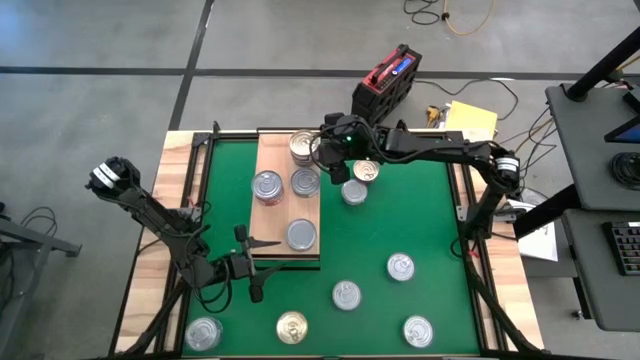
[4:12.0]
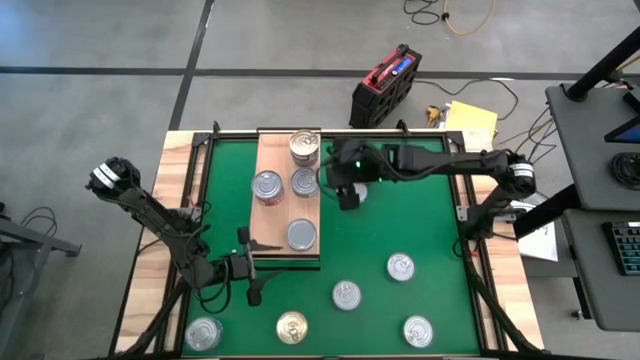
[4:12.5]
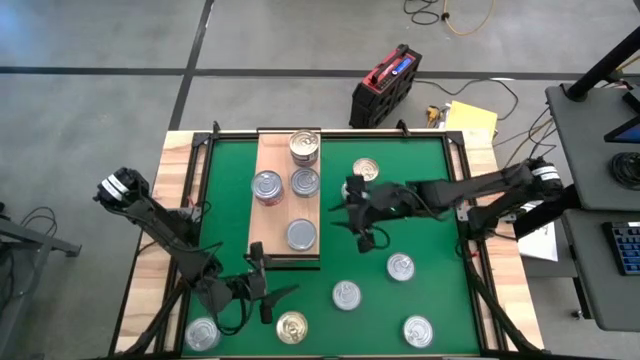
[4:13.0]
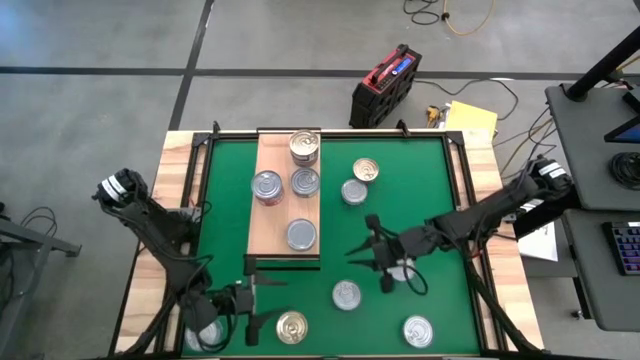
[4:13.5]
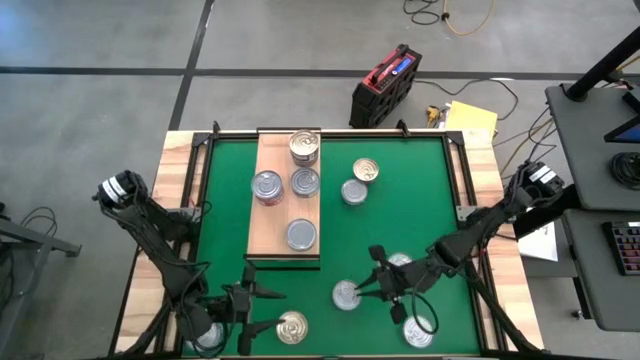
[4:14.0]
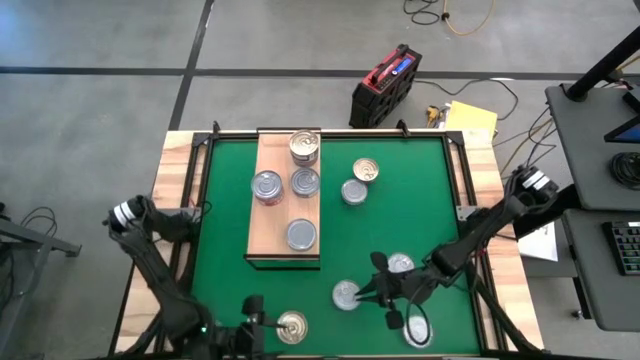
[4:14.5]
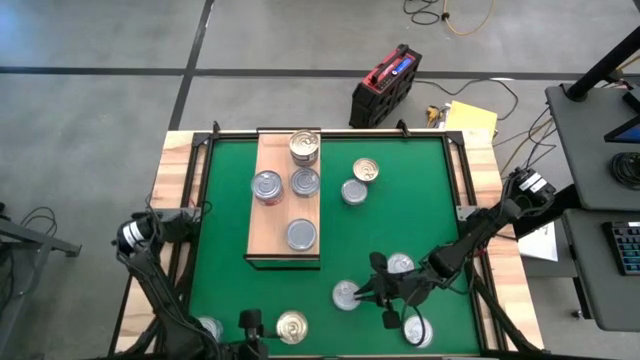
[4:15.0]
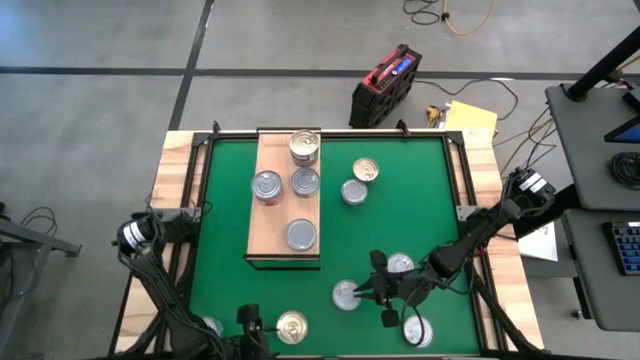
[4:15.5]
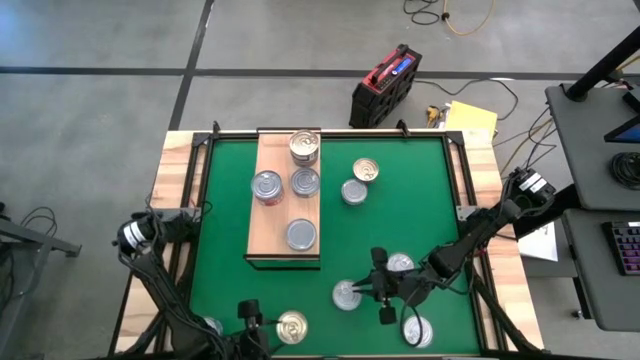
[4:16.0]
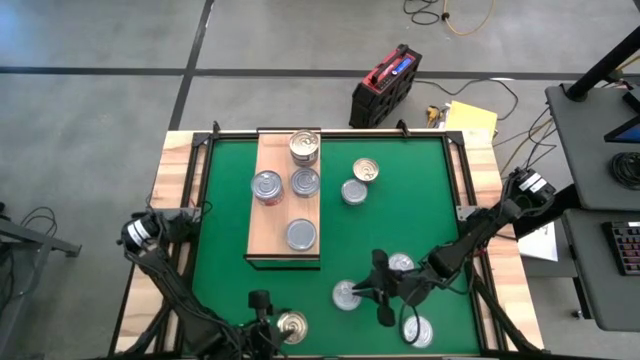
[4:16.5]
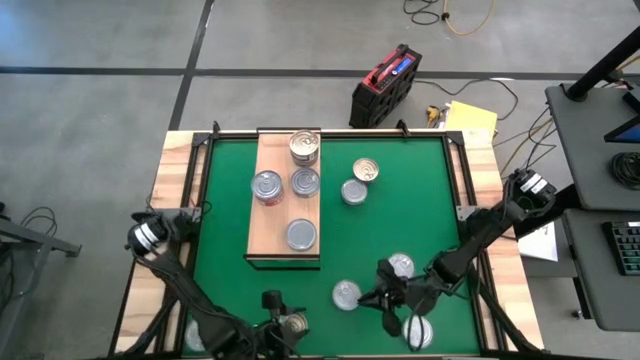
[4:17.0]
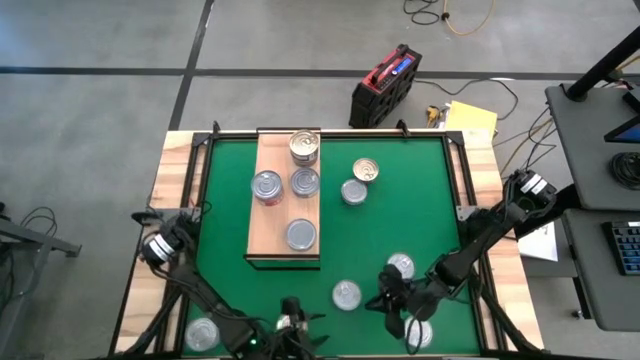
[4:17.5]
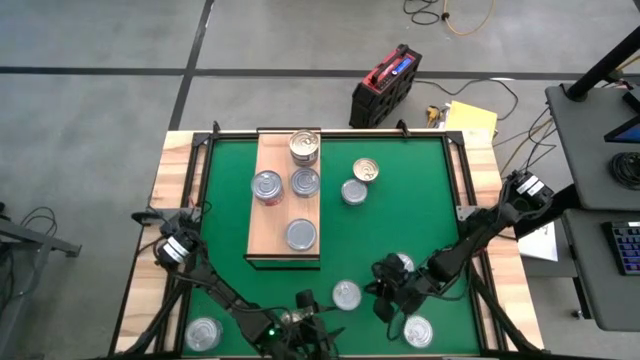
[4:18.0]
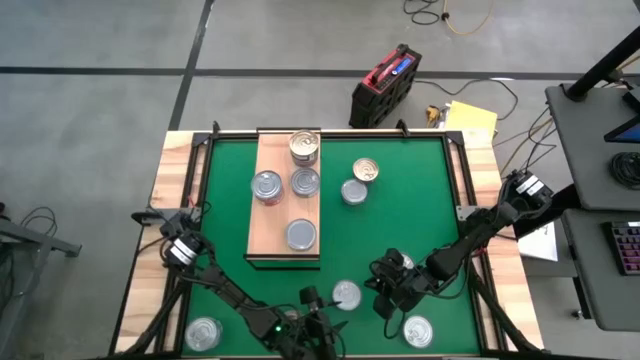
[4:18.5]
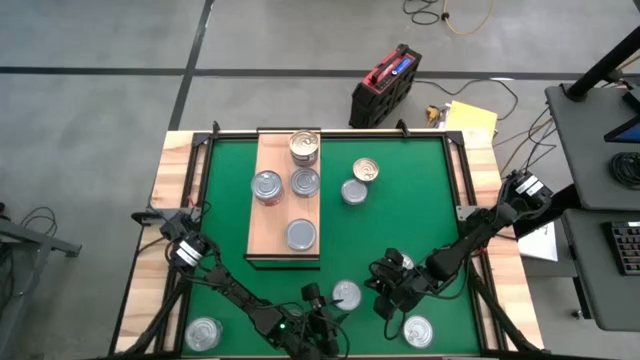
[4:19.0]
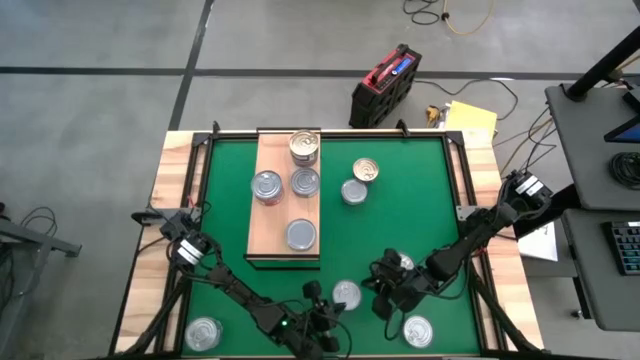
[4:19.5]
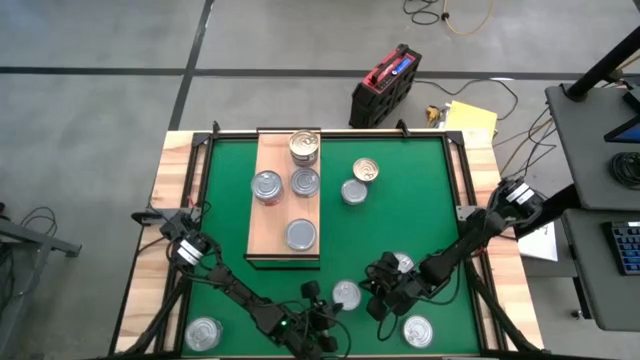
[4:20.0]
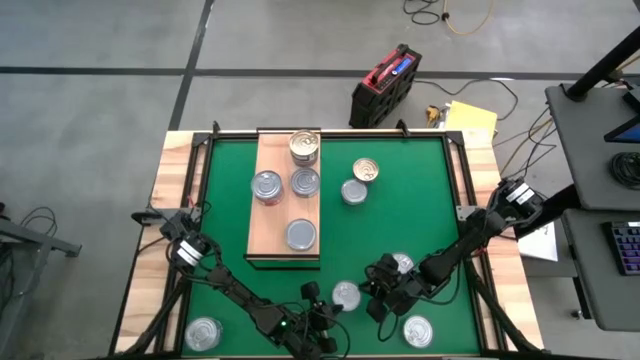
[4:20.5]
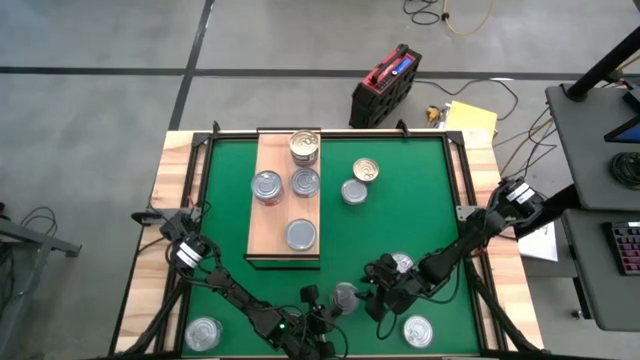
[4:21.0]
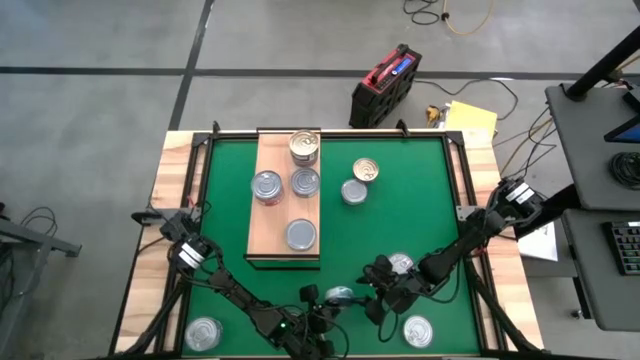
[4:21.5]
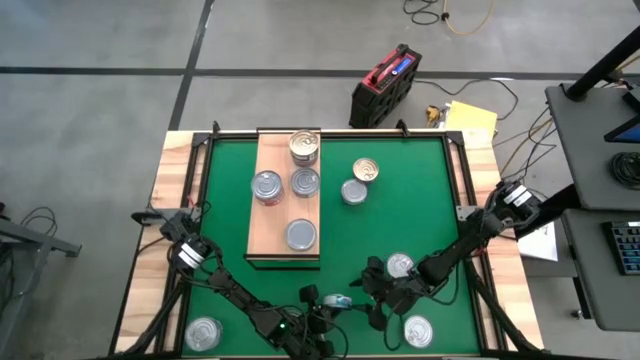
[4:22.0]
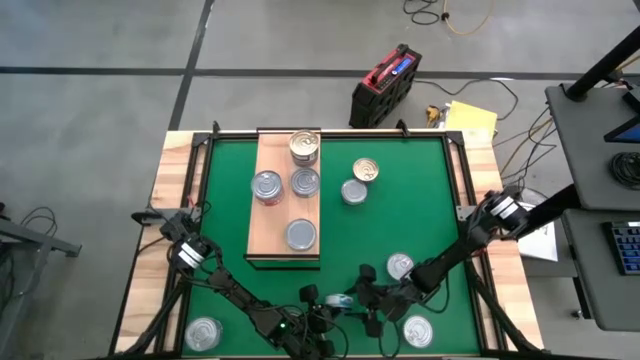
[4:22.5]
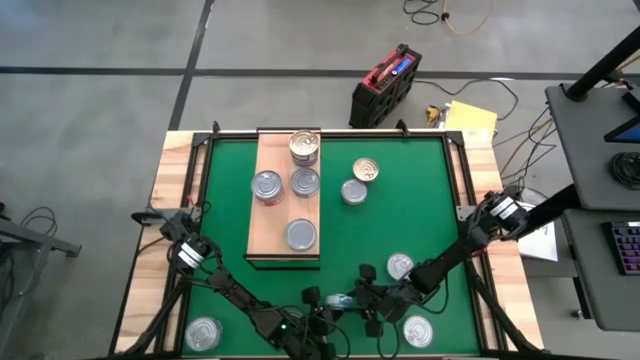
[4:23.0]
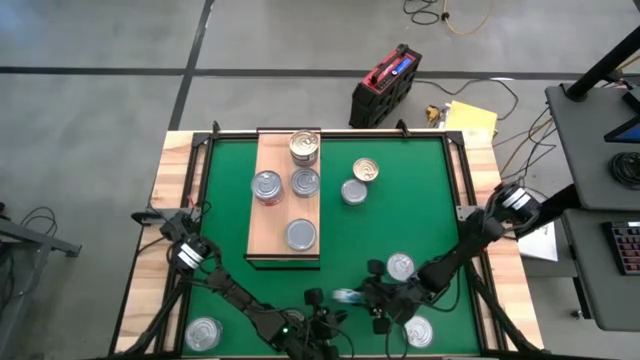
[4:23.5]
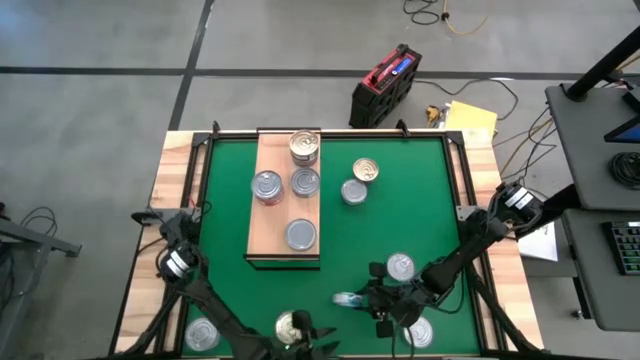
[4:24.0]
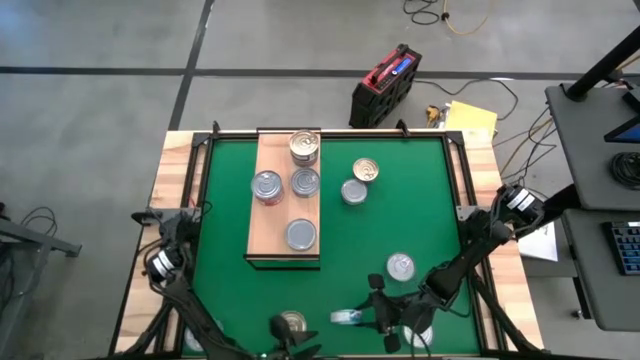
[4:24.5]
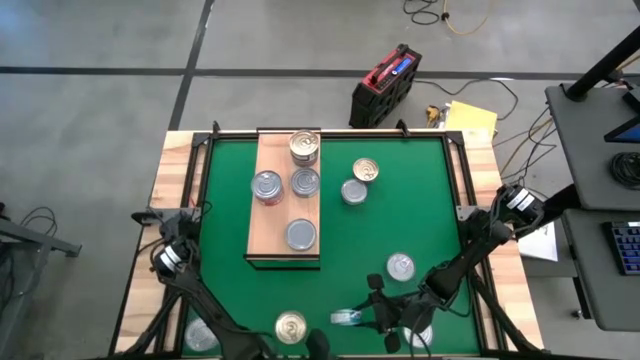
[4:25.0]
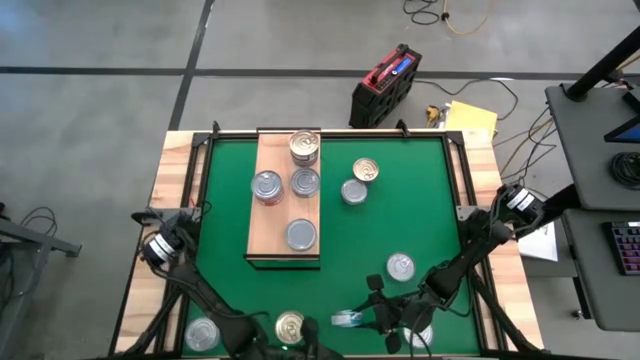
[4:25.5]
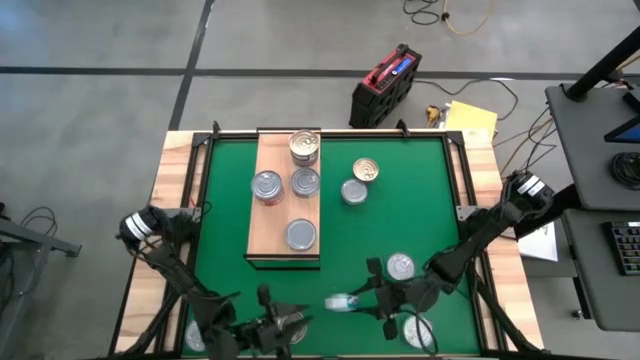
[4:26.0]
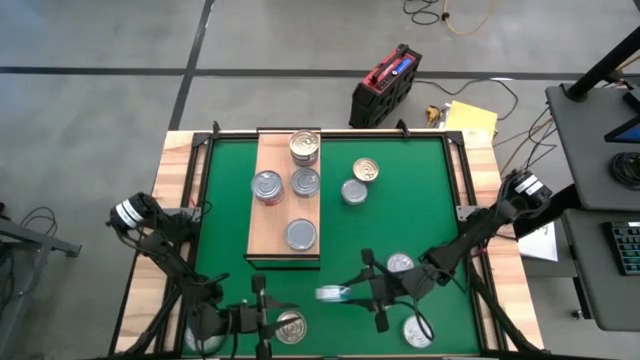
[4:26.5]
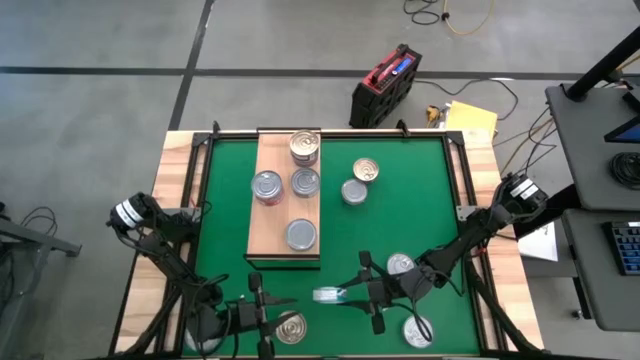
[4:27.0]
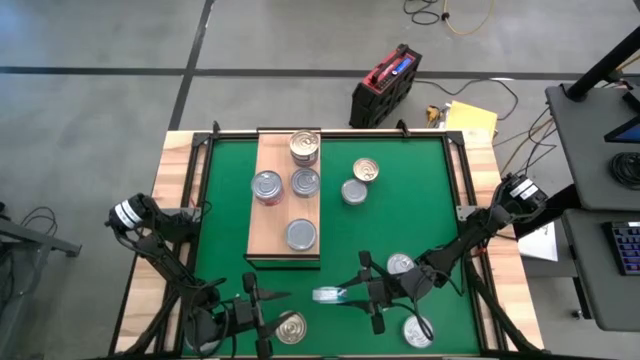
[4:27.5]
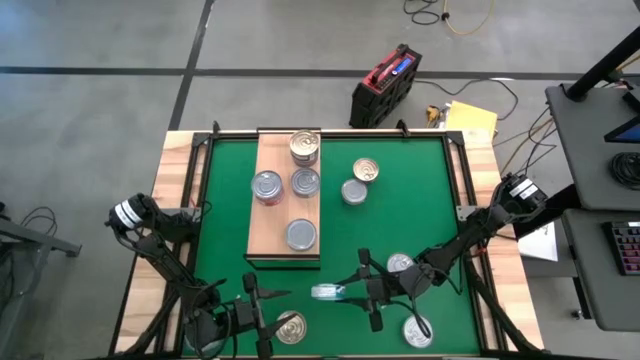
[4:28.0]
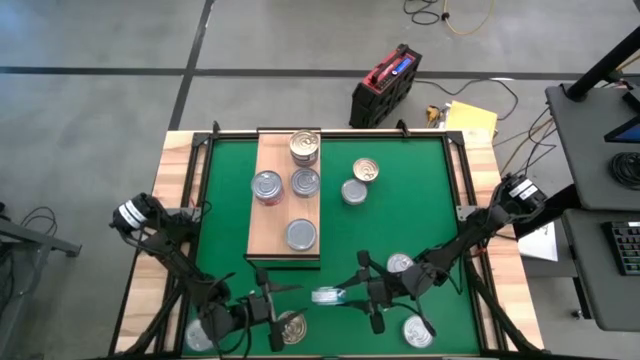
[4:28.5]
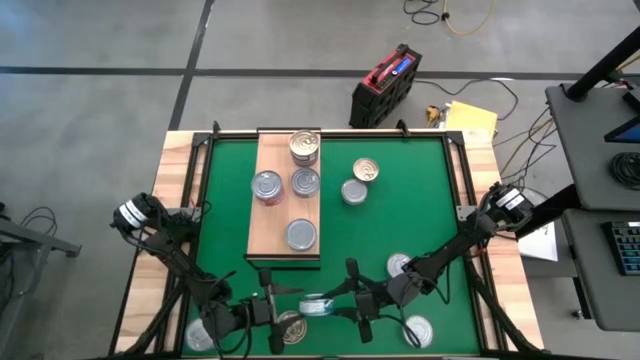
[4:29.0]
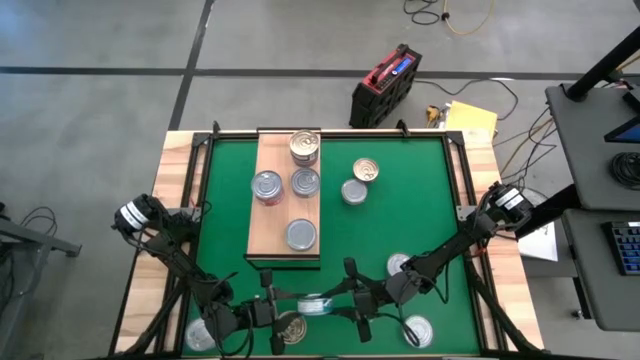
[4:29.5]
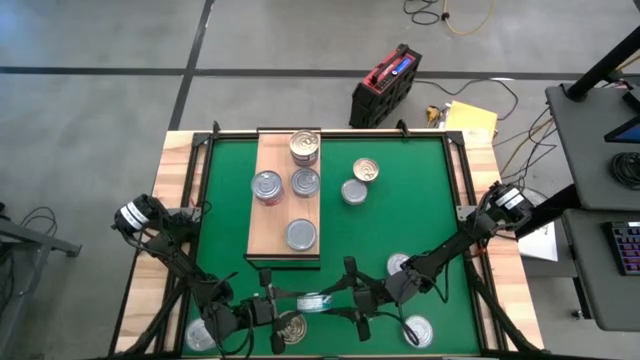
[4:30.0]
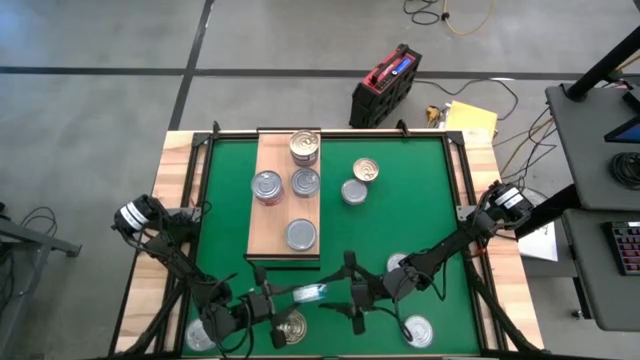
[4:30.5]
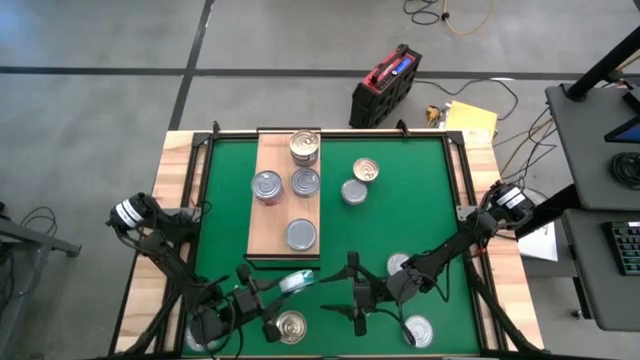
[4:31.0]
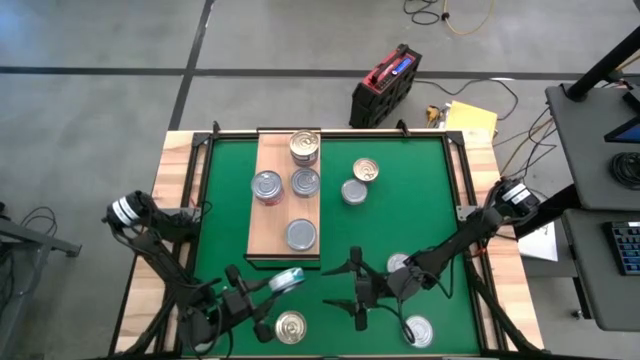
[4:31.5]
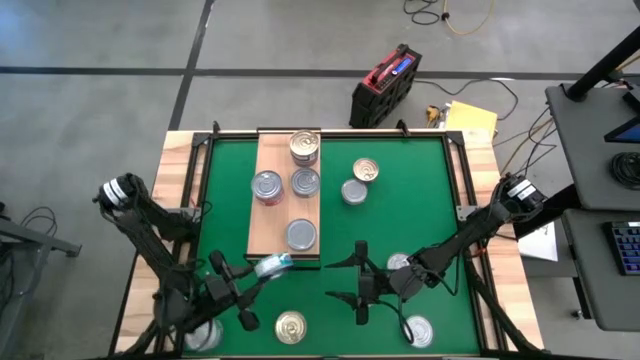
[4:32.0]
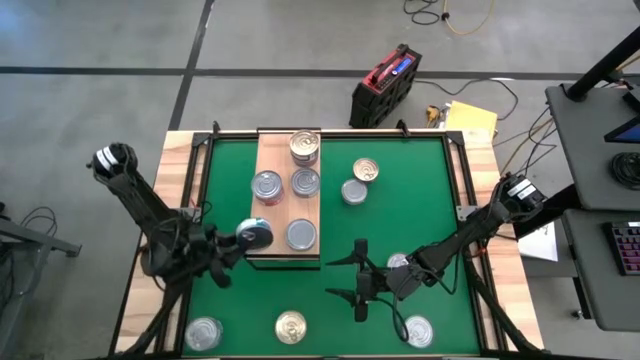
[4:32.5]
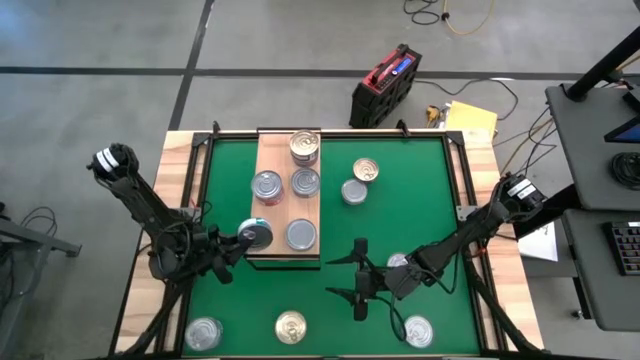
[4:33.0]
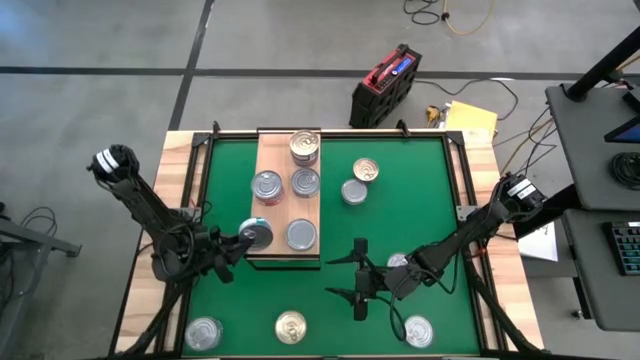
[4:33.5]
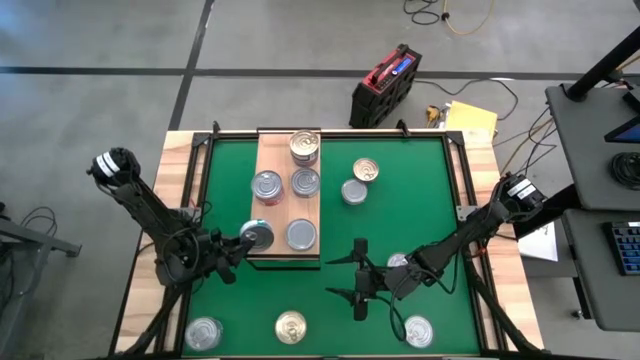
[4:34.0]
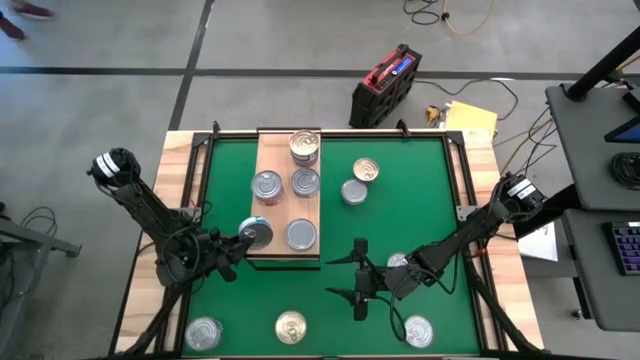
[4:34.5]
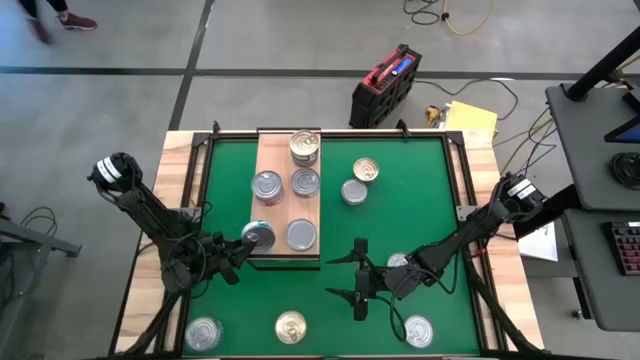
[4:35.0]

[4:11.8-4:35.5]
Task: Stack canned seafood by type on shelf
Put the green and blue tuna can on the shelf
